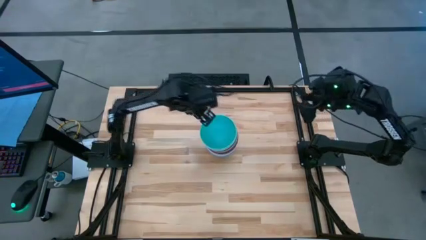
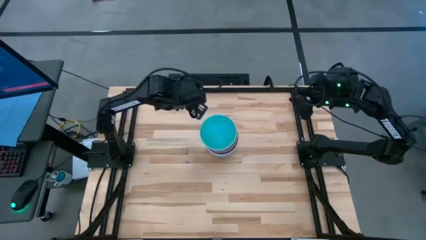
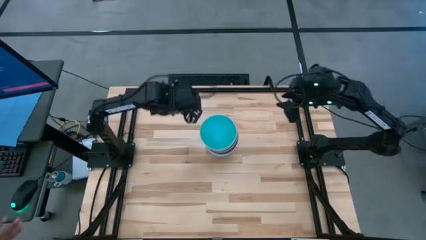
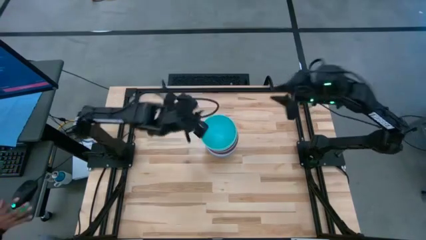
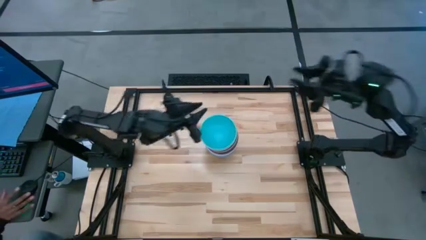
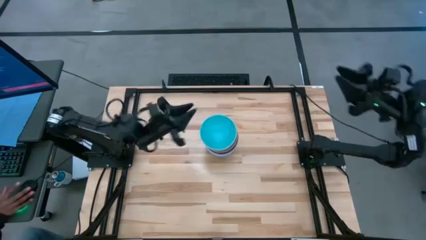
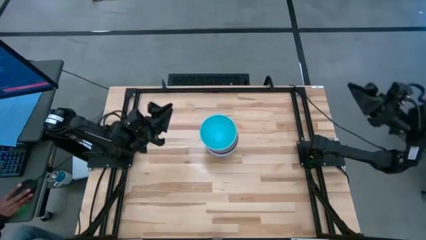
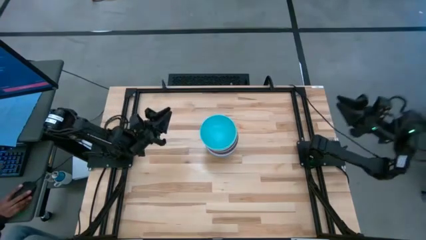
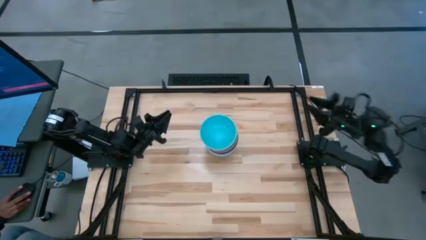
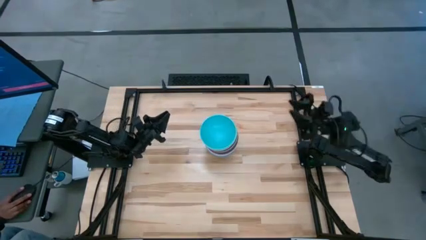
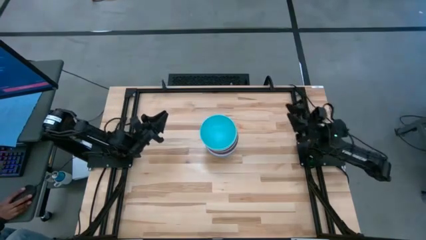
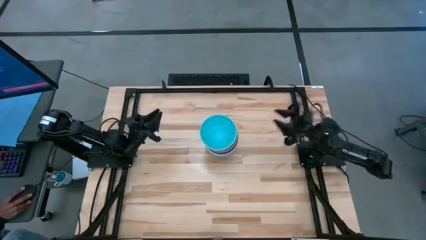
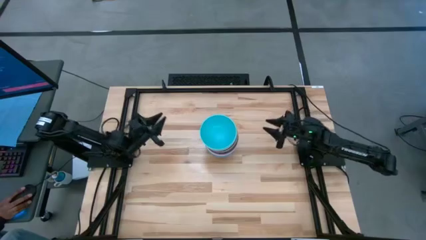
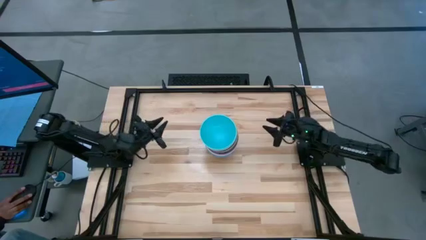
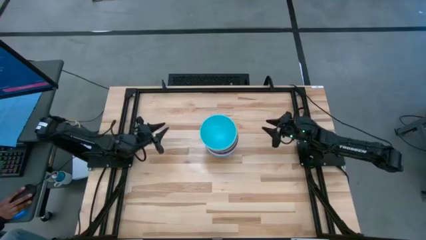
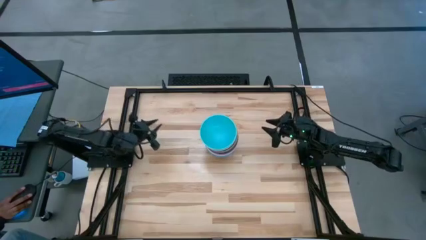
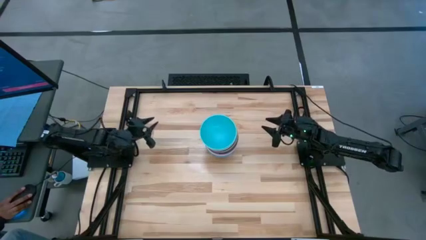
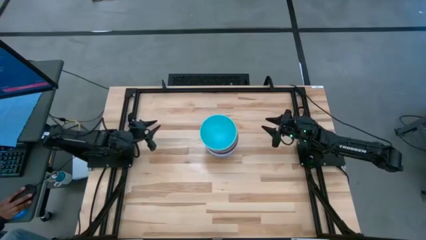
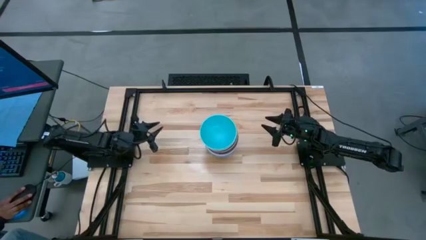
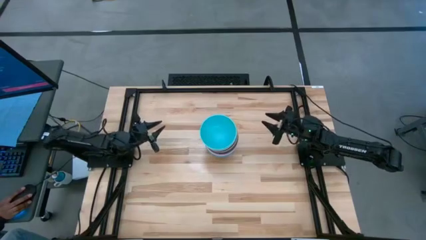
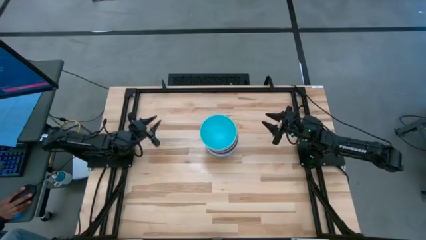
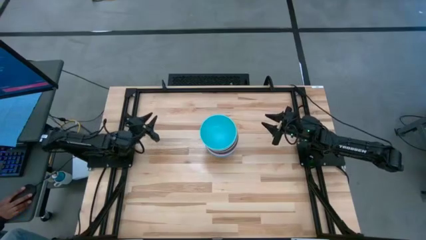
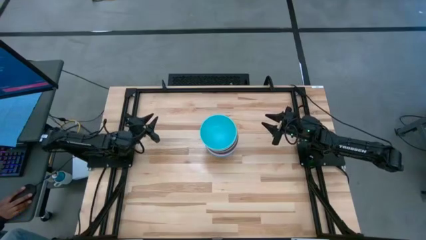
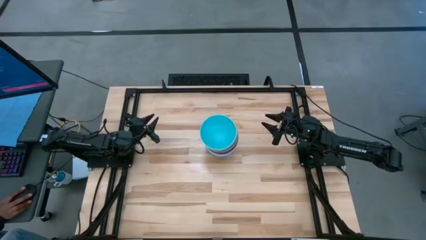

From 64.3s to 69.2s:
Task: Nest bowls inside each other
Return to Home Position

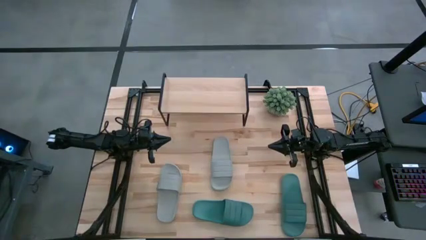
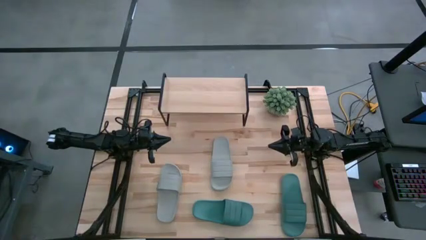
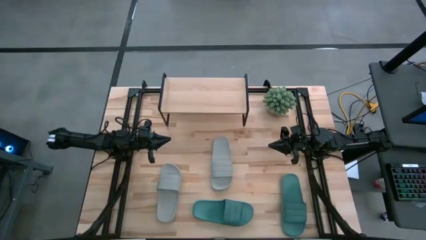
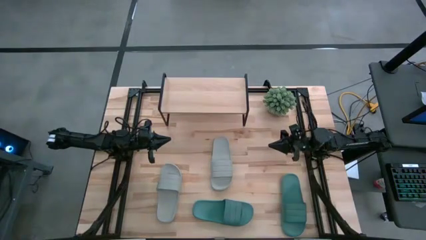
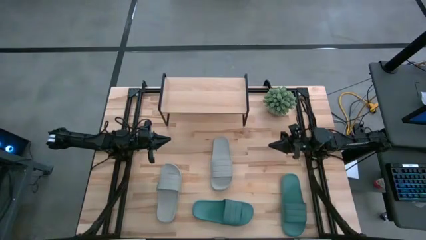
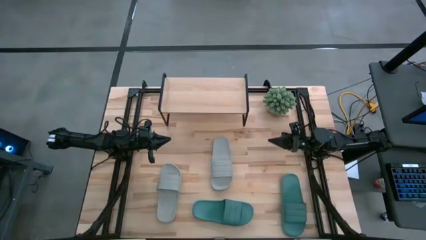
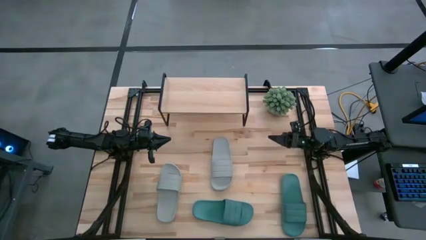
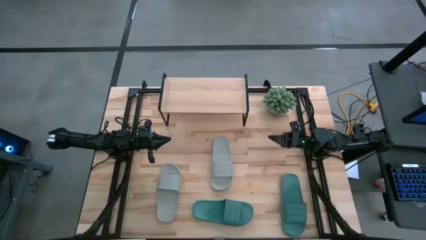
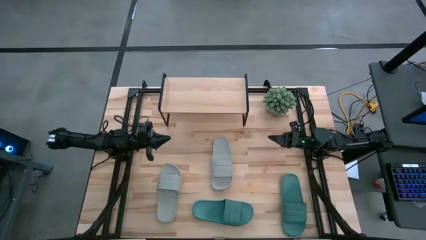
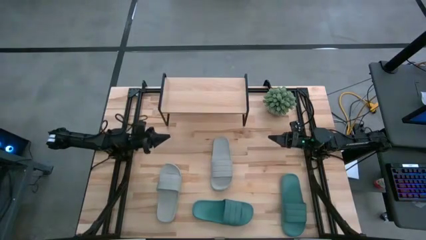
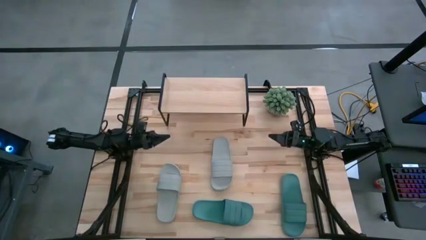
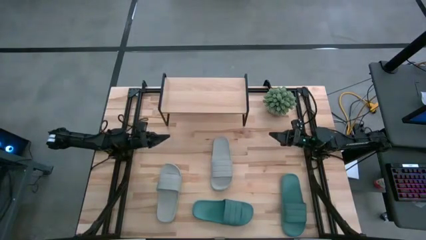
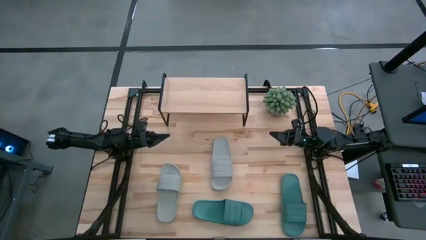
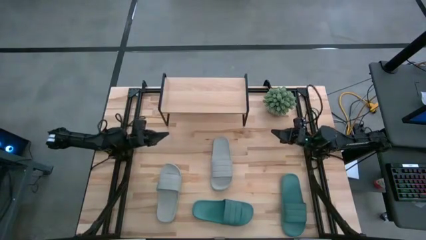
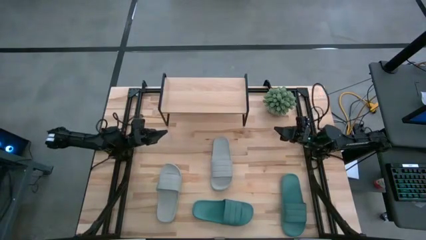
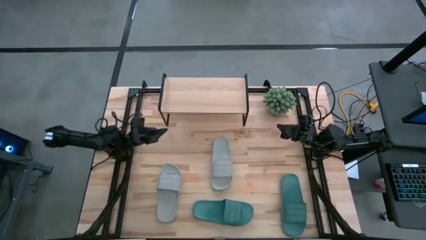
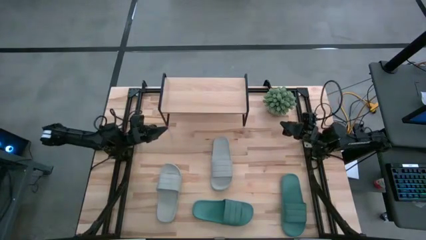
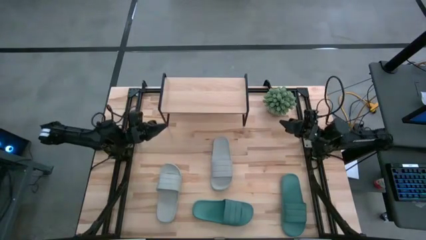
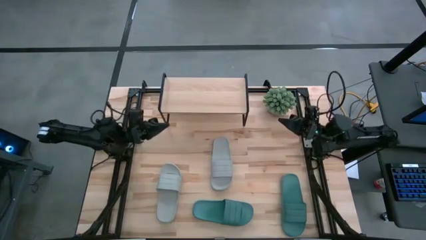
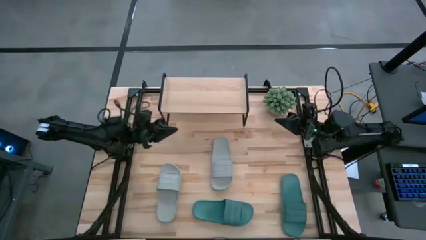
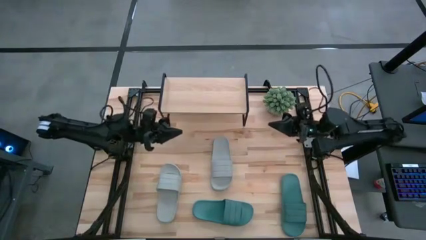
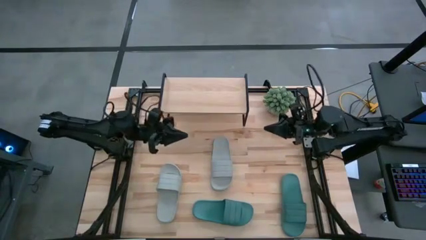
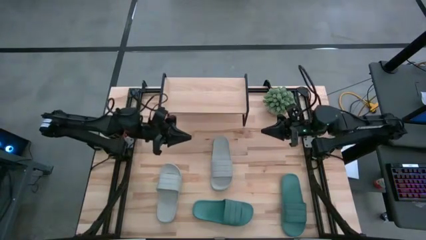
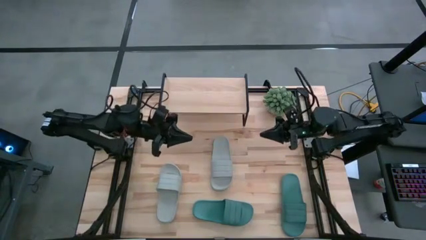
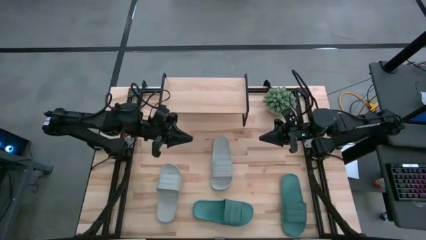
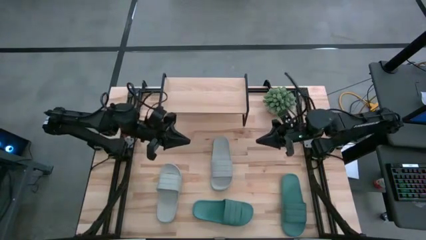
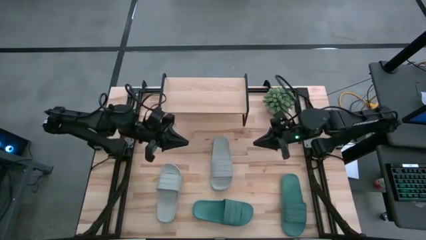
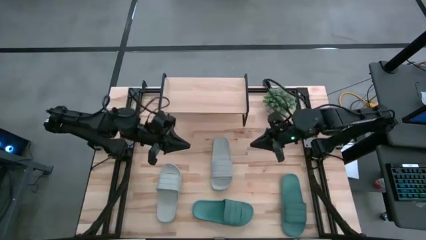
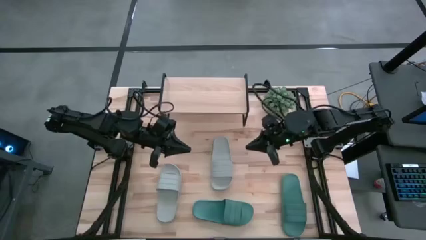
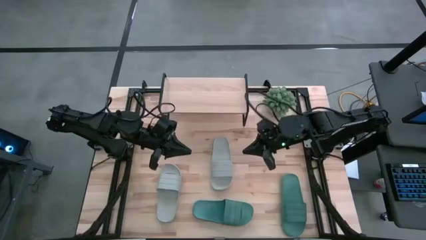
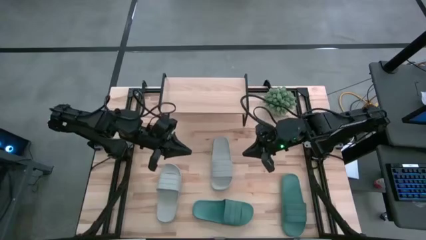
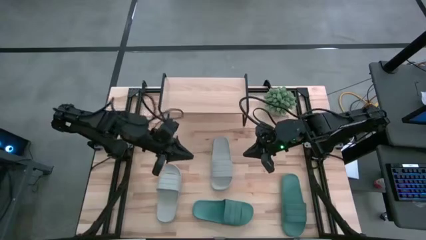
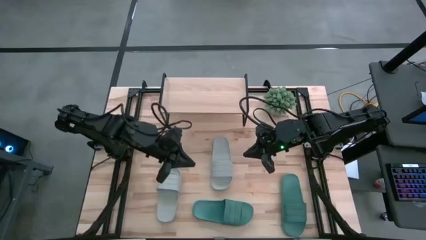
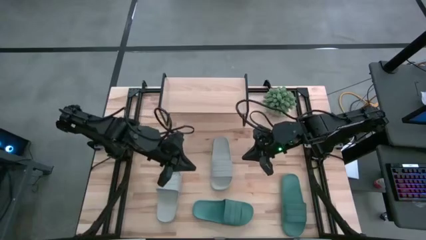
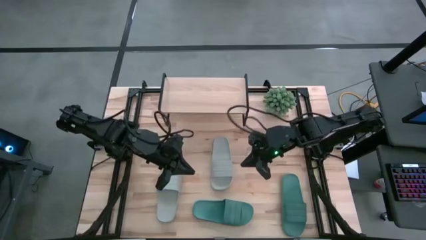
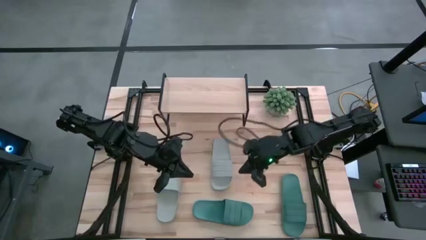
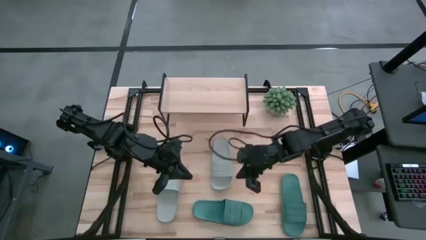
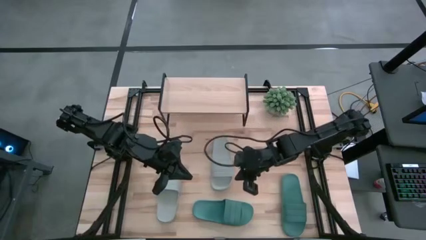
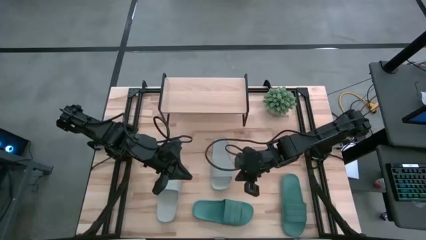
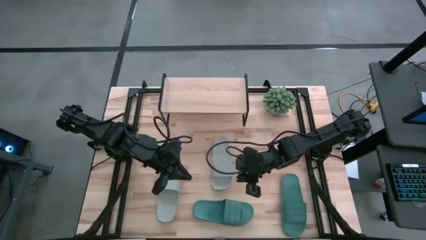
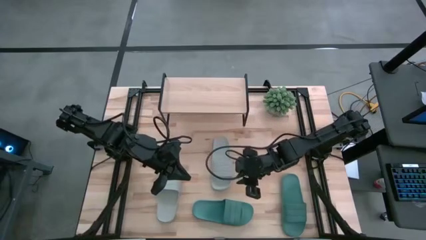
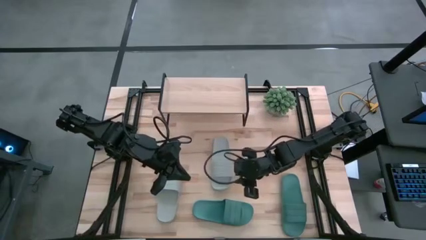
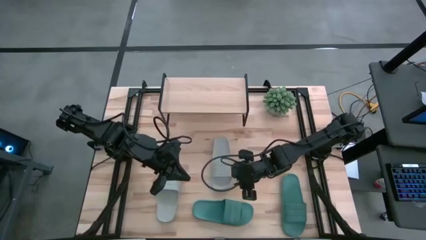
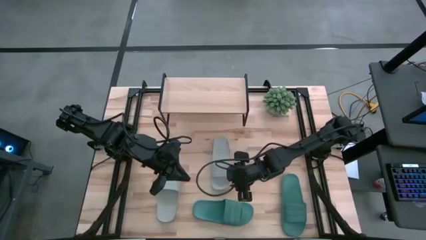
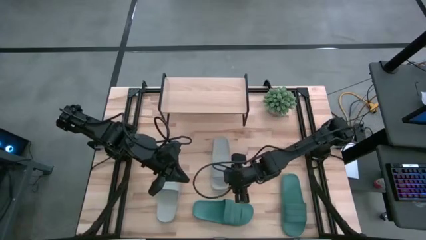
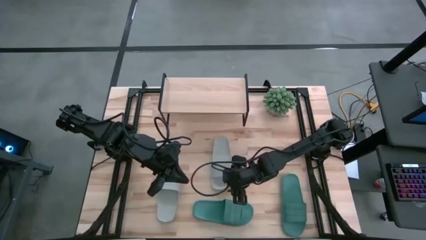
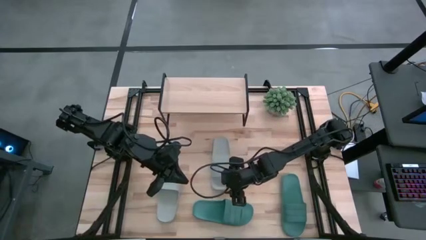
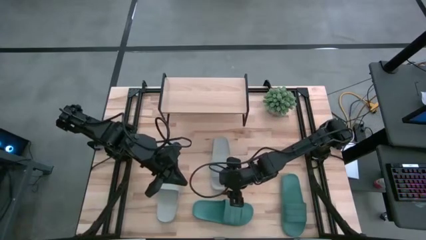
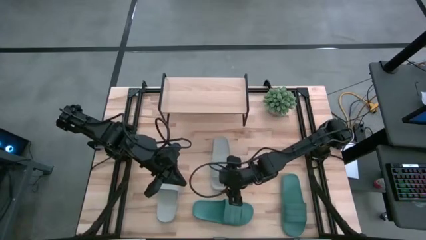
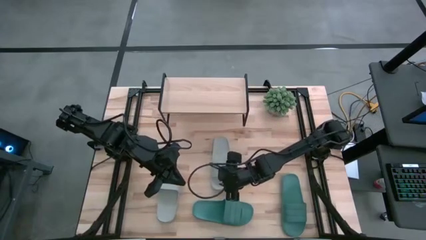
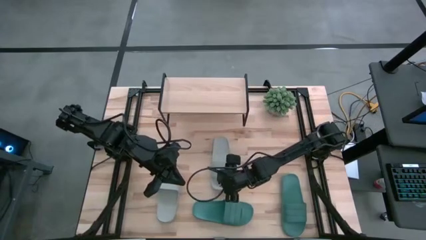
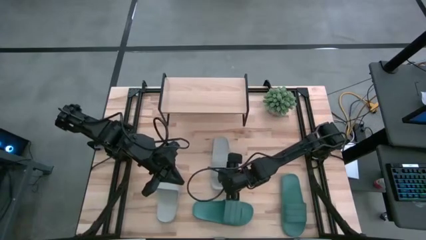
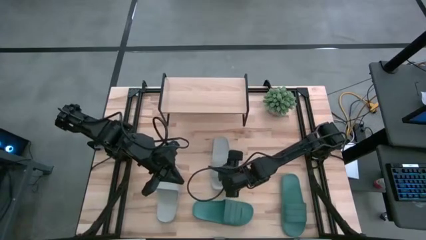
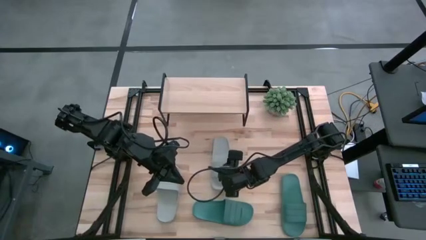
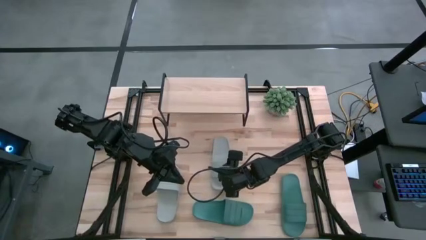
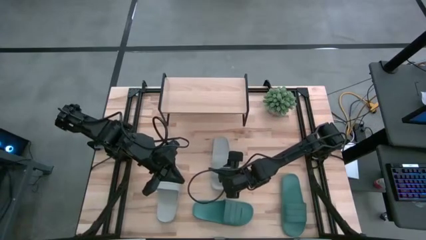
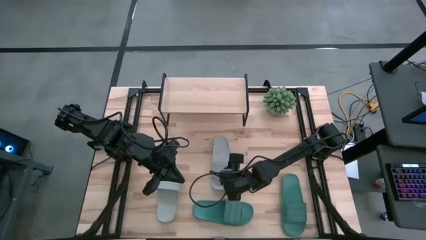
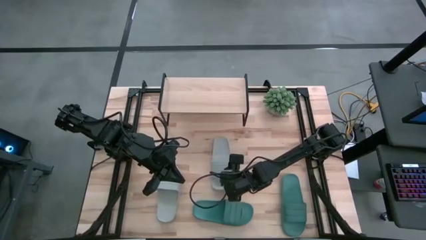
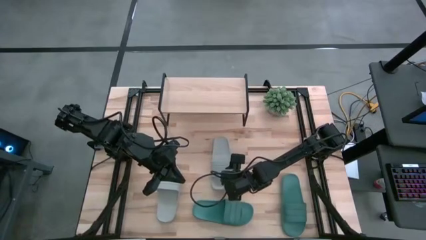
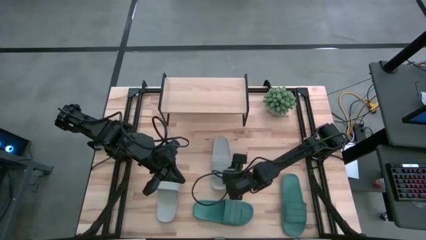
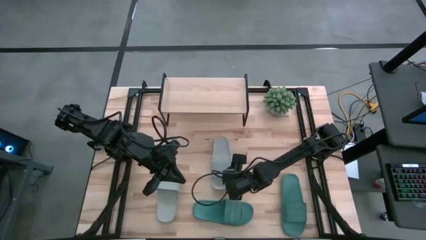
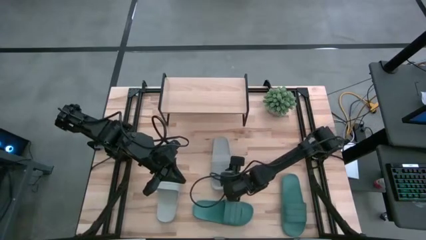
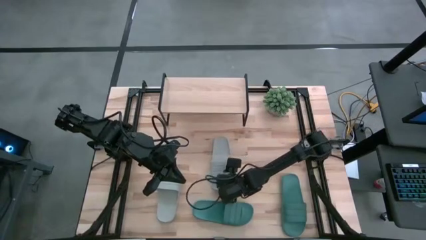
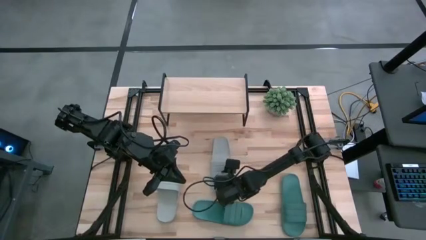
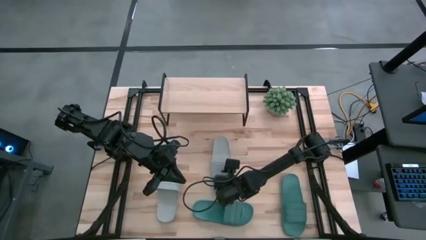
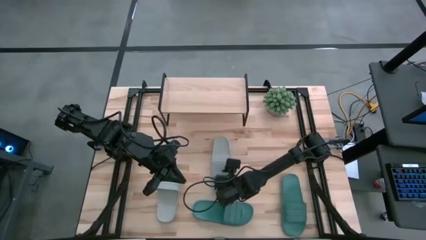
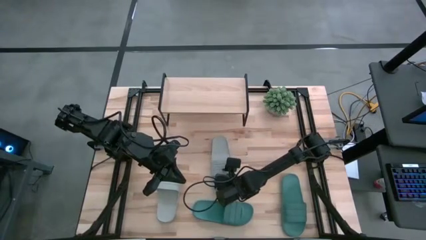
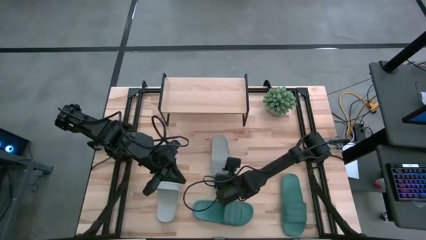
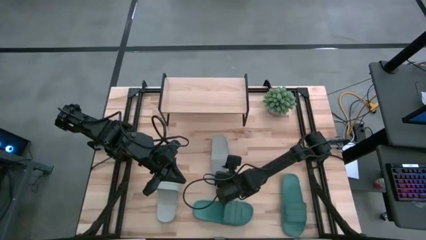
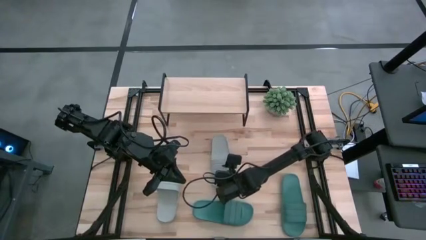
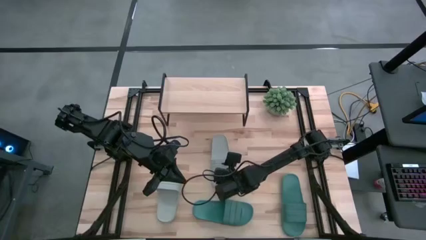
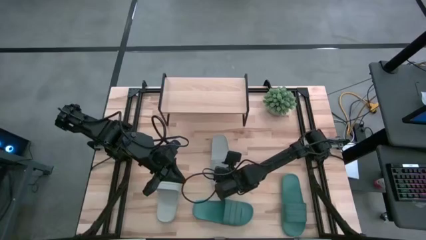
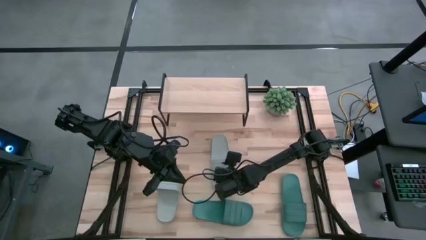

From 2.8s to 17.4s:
Task: Pick and place slides into the shelf
Put the right gray slipper on the shelf
